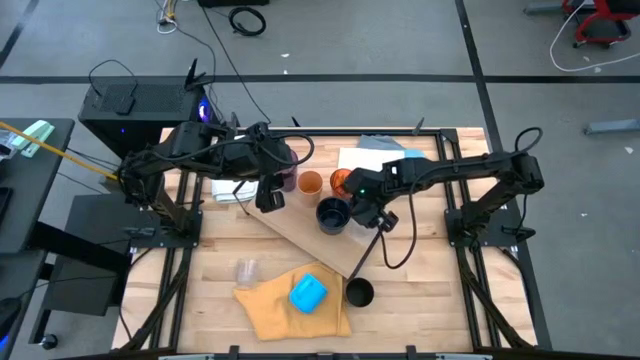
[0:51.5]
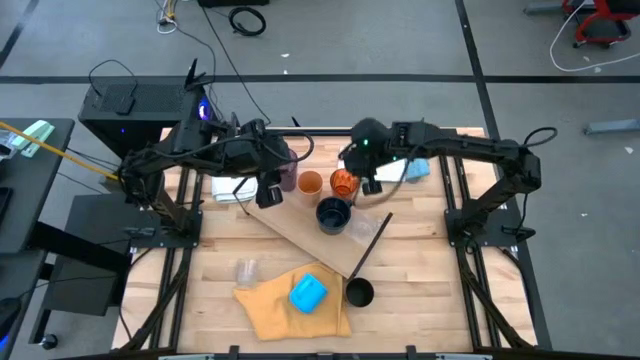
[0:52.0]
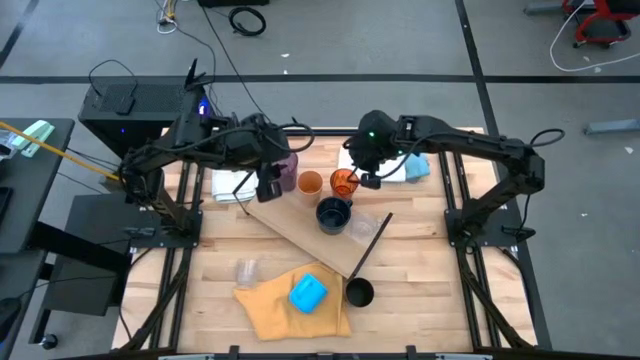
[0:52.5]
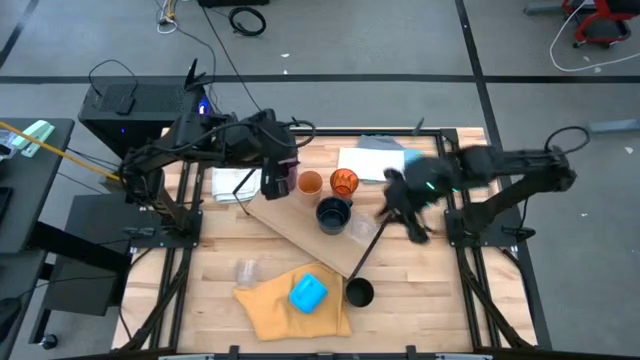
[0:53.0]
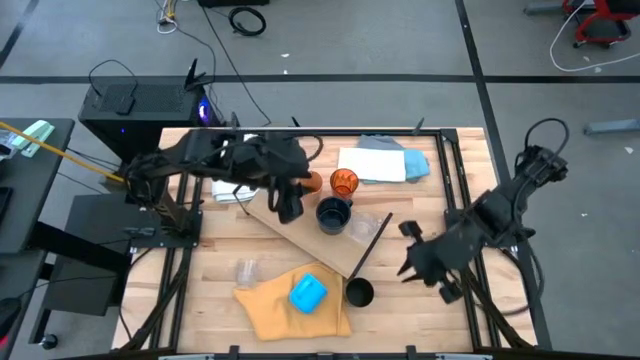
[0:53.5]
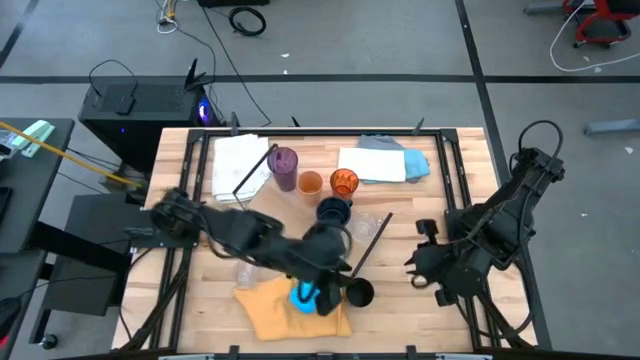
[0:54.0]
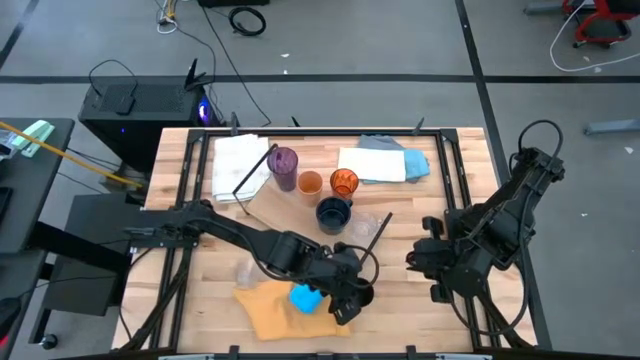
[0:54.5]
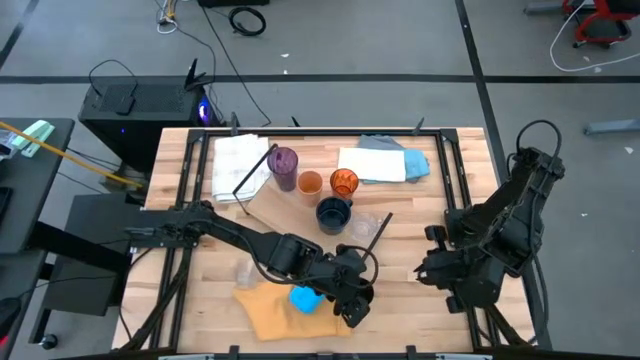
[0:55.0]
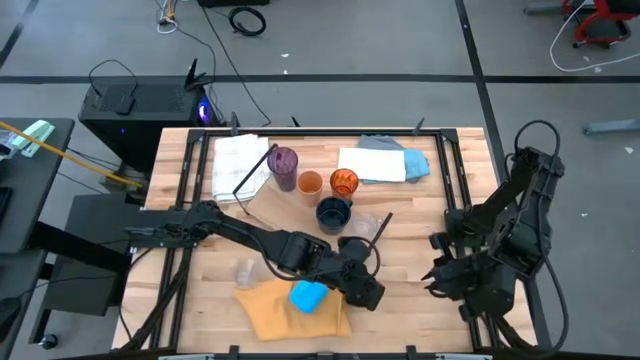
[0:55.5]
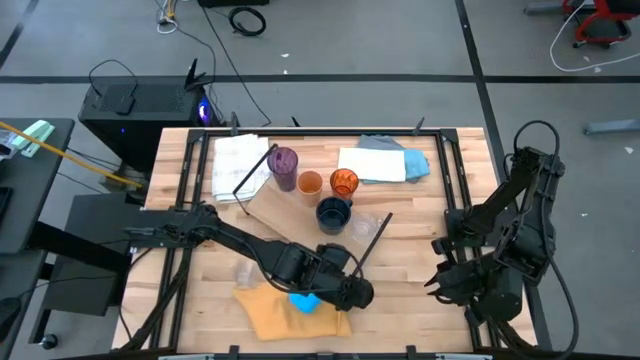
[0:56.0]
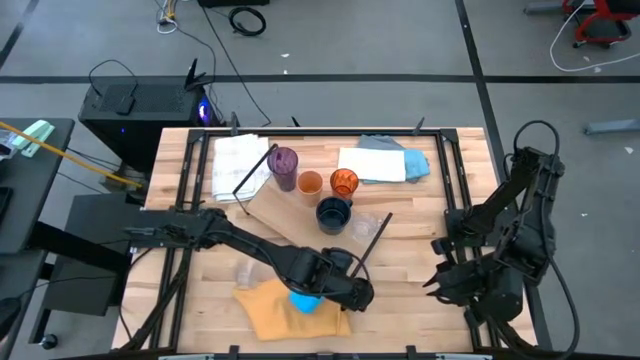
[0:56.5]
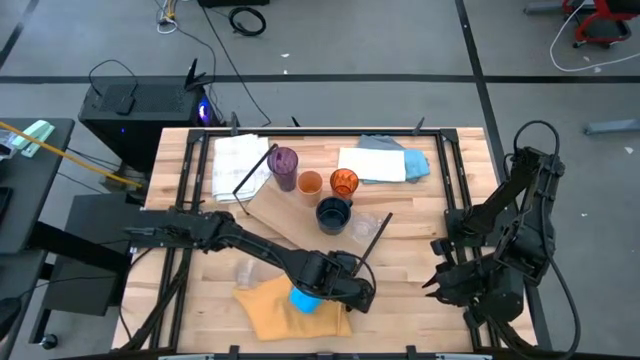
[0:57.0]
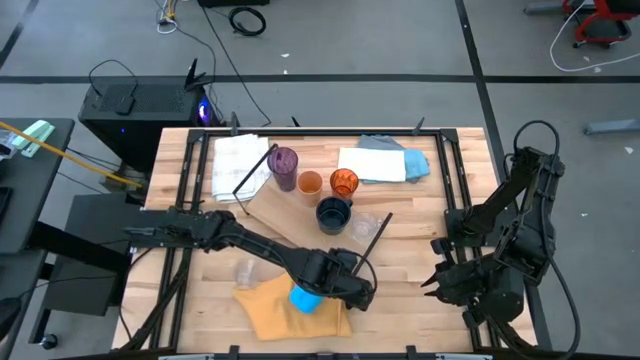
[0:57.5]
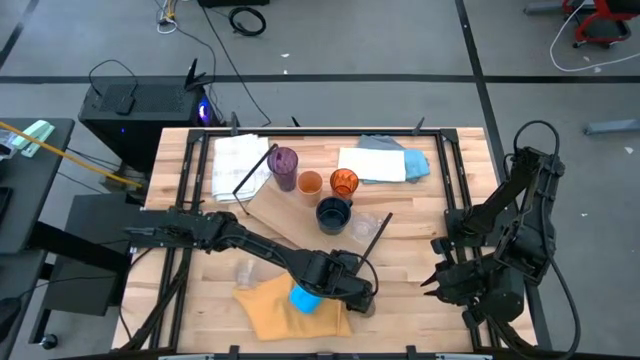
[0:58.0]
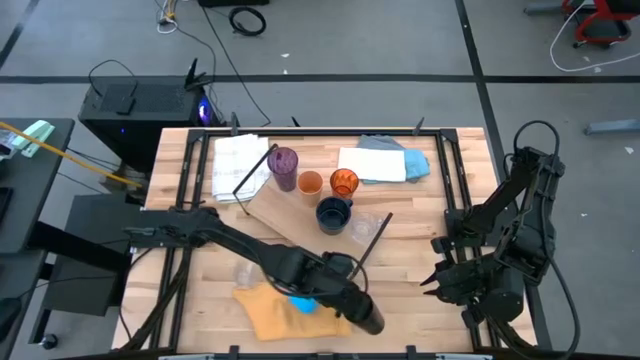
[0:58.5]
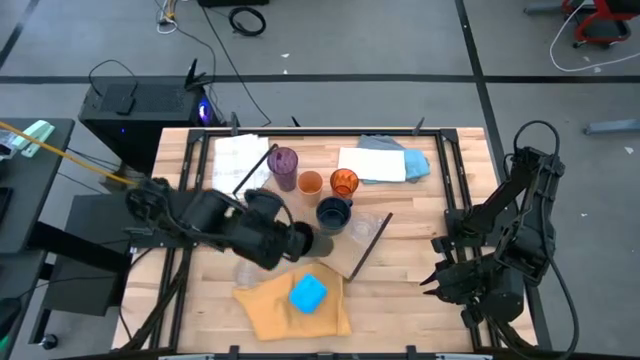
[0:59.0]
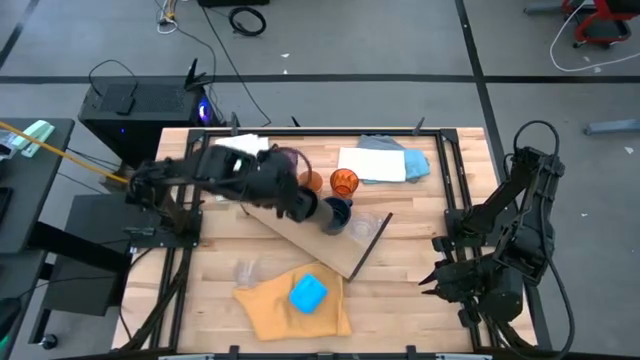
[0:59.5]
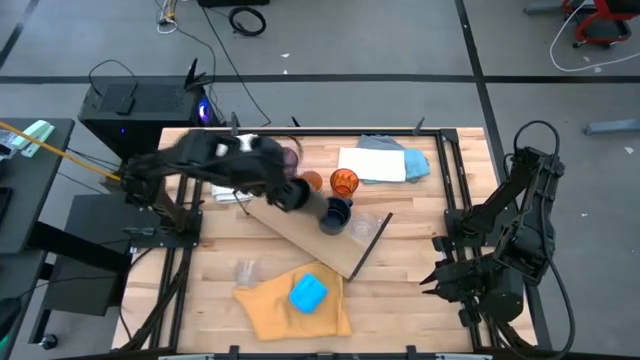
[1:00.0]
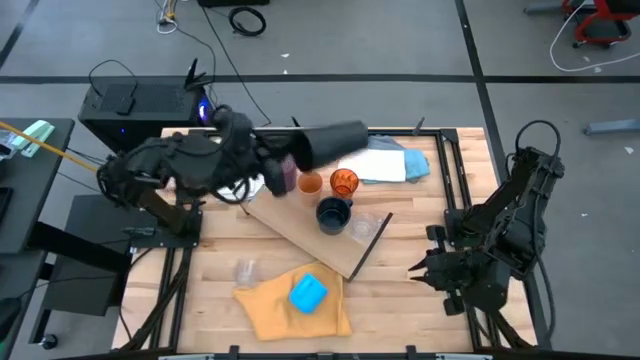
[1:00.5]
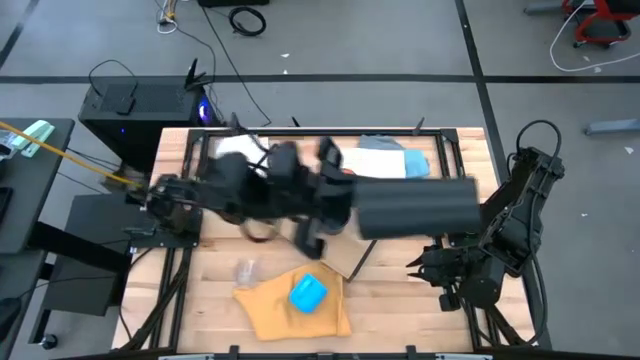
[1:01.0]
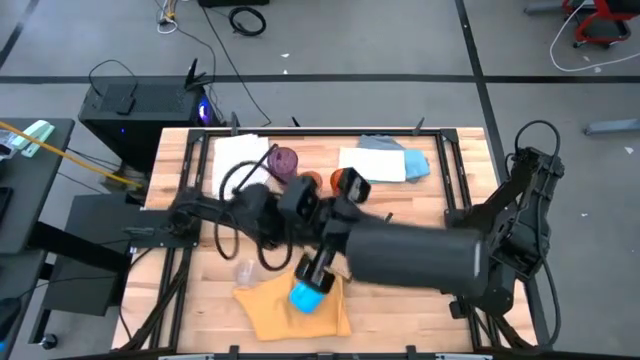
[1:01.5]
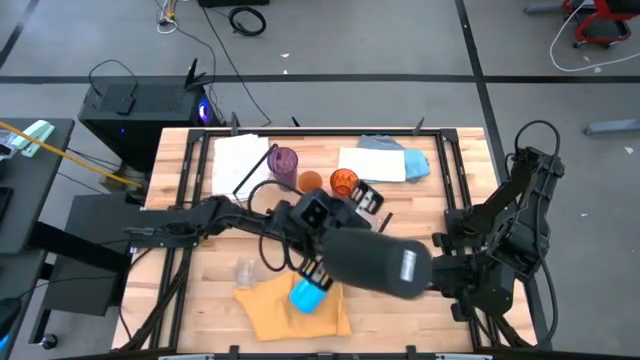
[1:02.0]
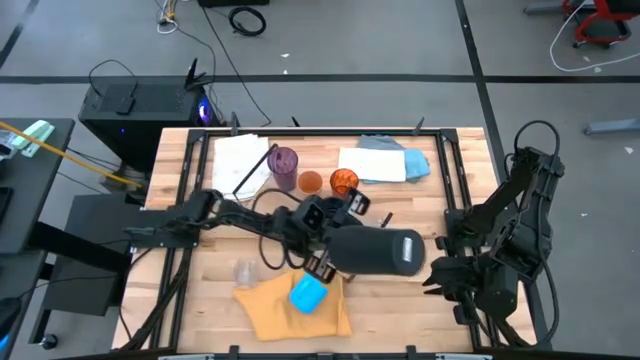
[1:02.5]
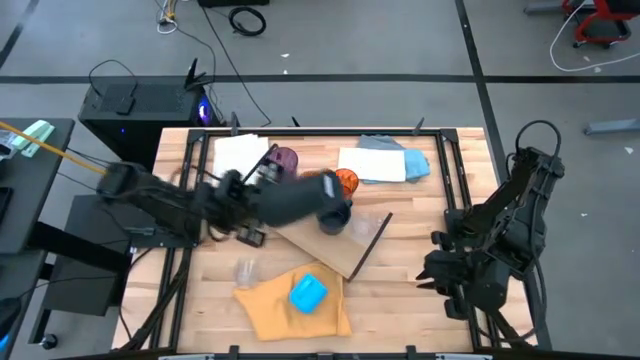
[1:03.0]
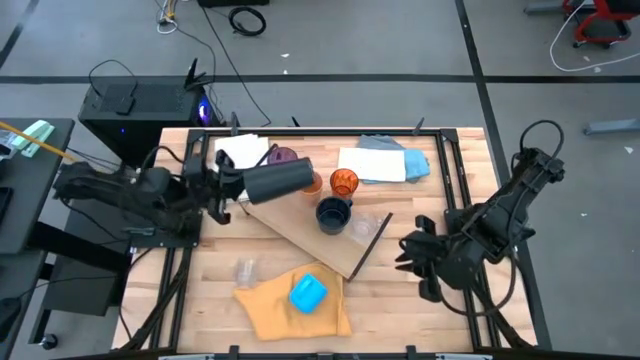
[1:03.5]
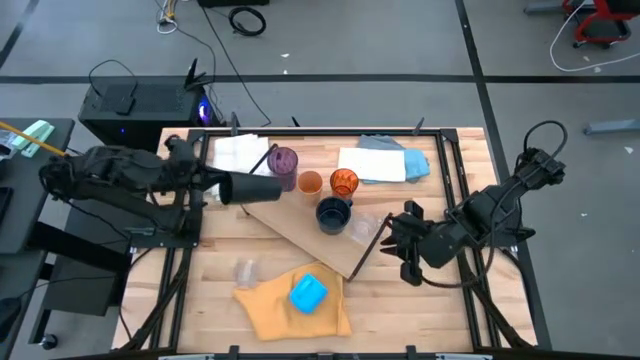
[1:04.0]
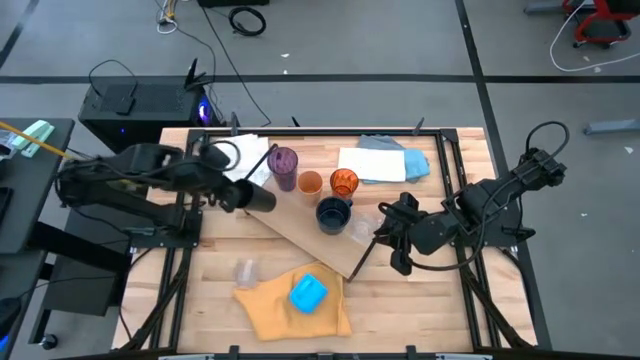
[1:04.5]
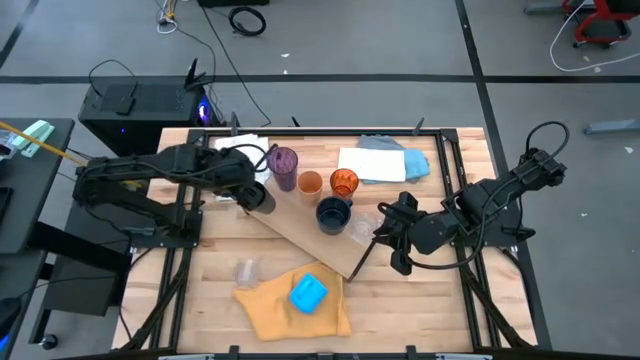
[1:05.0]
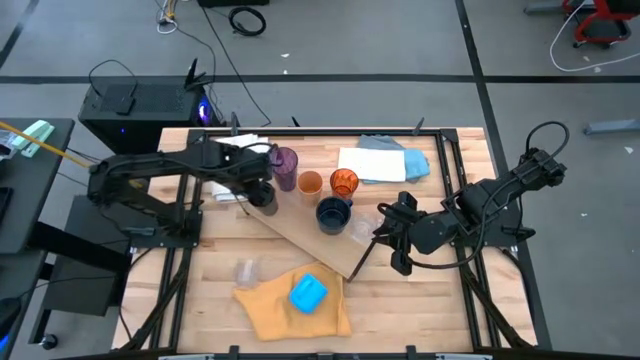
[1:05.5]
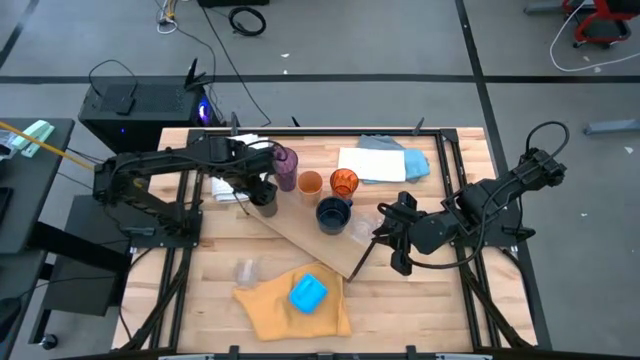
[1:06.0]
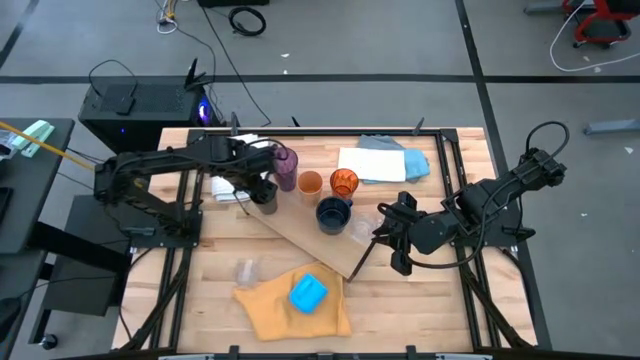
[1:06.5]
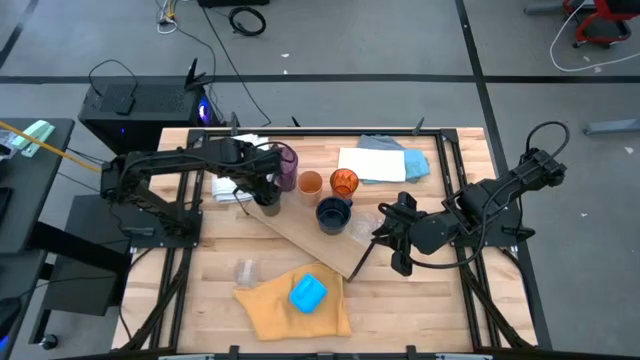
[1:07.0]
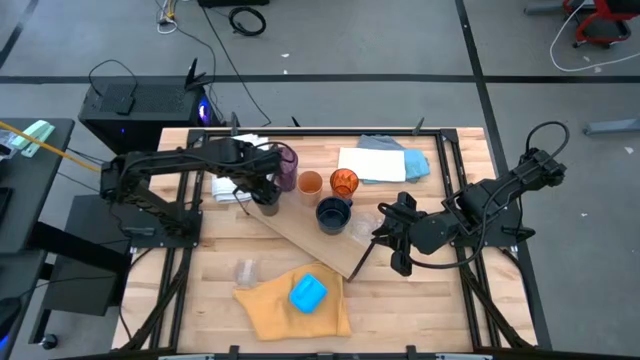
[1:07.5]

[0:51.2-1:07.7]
Task: Stack small to large cups/mugs on shelf
Put the black cup on the shelf
